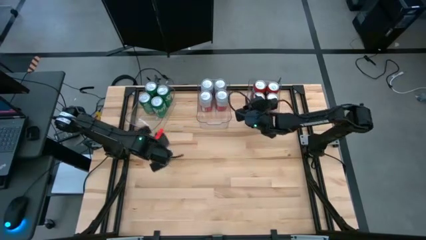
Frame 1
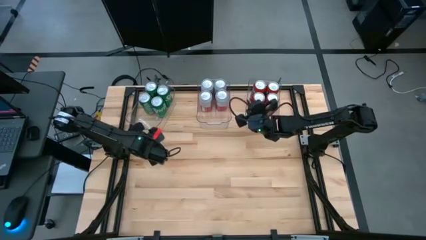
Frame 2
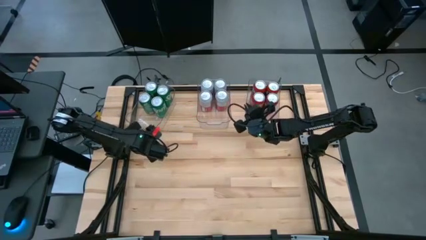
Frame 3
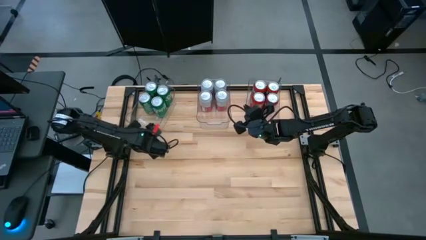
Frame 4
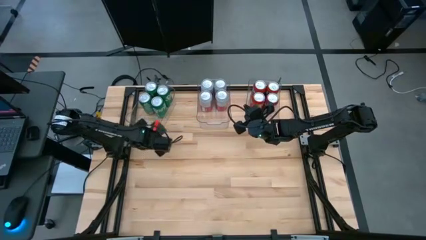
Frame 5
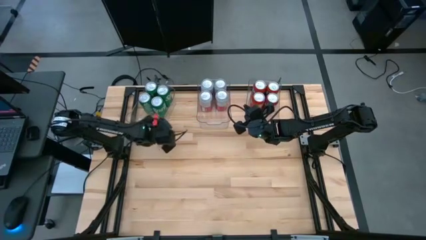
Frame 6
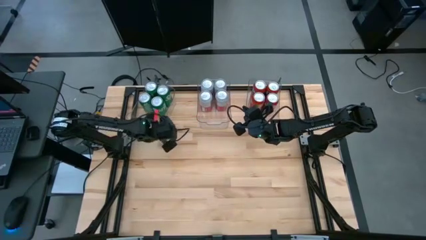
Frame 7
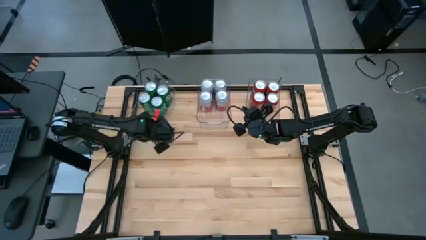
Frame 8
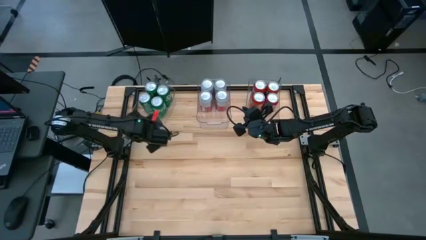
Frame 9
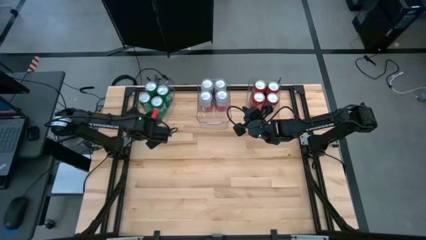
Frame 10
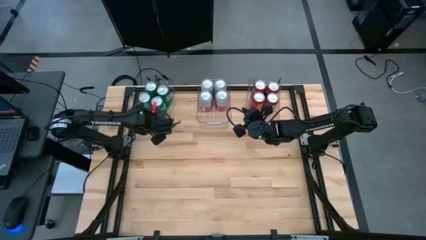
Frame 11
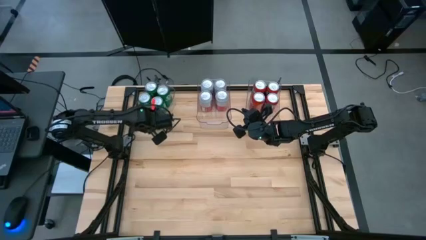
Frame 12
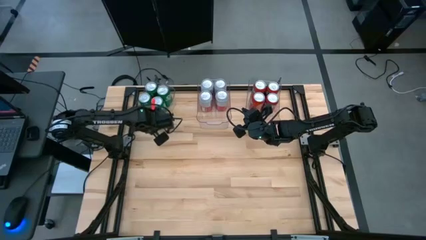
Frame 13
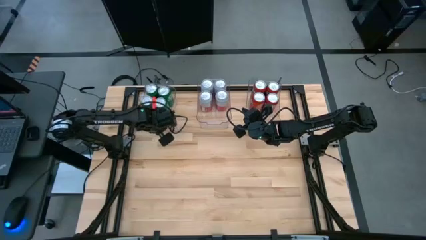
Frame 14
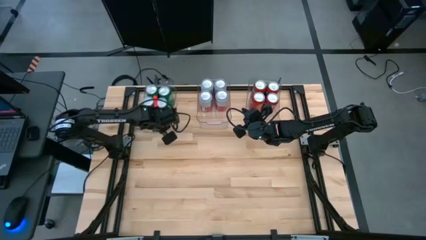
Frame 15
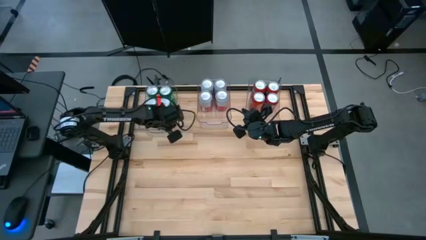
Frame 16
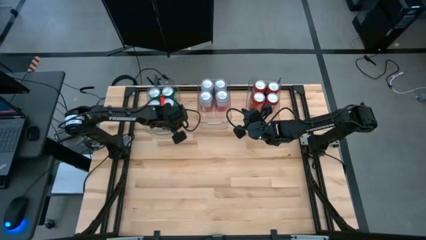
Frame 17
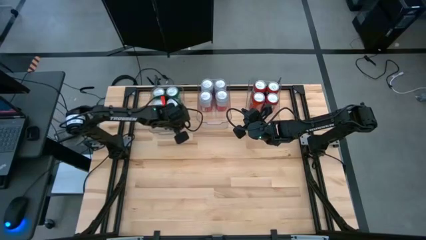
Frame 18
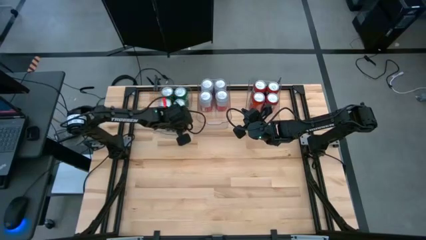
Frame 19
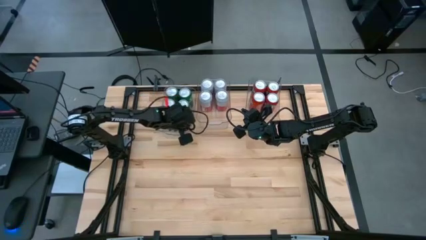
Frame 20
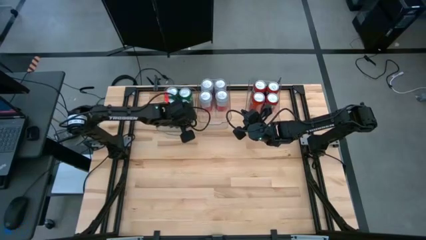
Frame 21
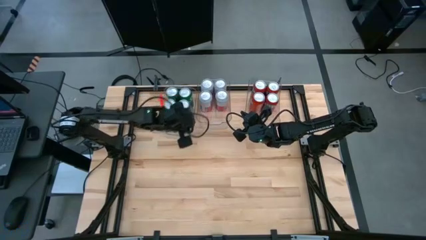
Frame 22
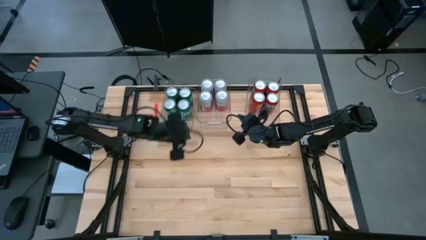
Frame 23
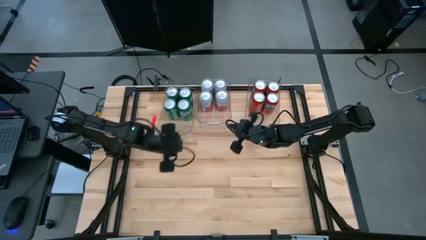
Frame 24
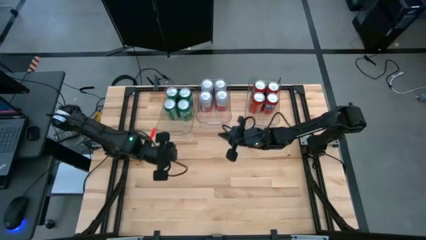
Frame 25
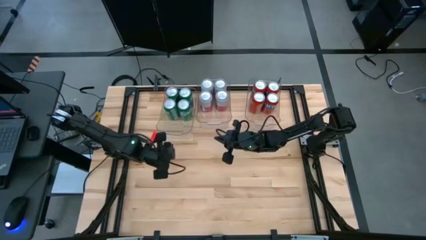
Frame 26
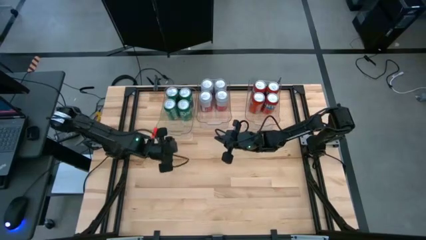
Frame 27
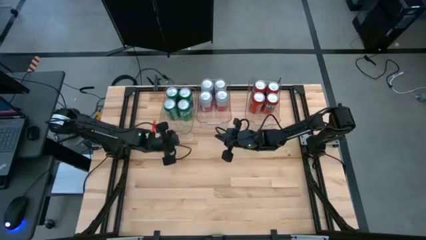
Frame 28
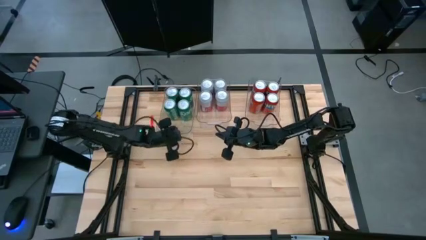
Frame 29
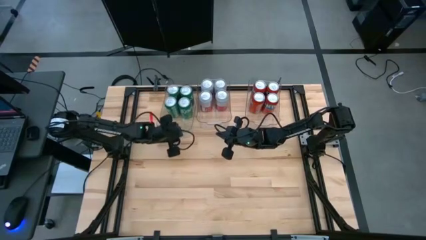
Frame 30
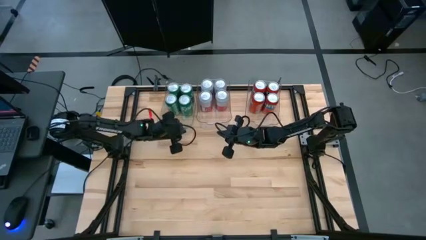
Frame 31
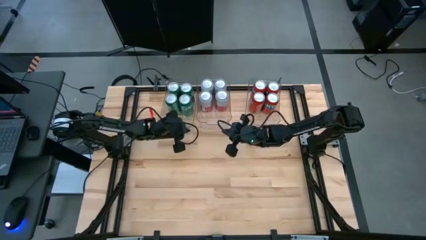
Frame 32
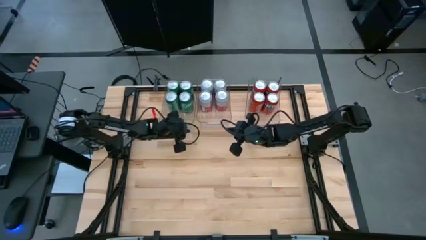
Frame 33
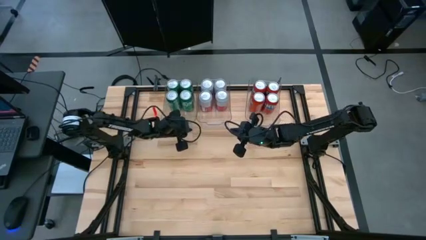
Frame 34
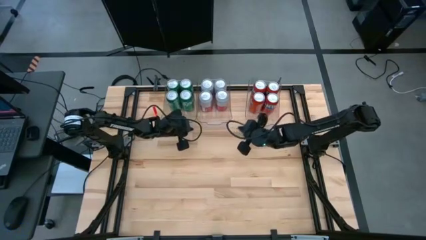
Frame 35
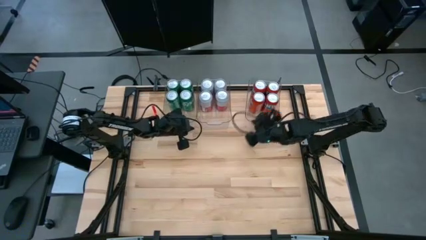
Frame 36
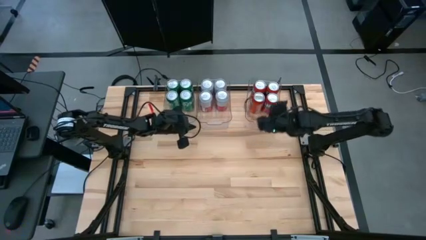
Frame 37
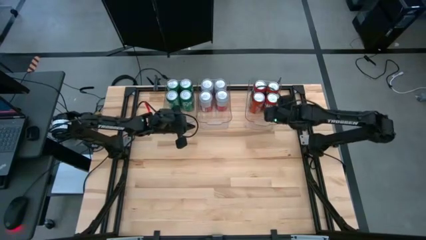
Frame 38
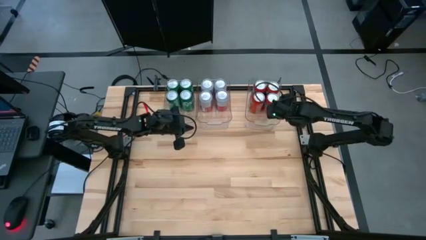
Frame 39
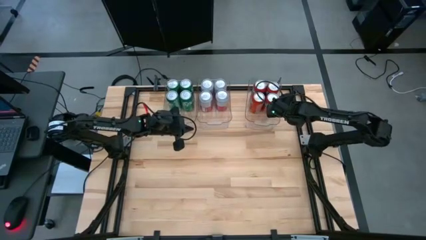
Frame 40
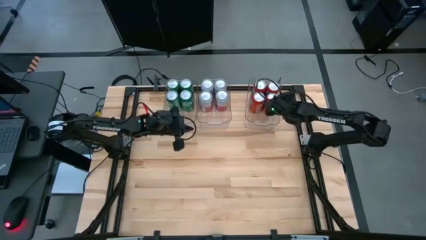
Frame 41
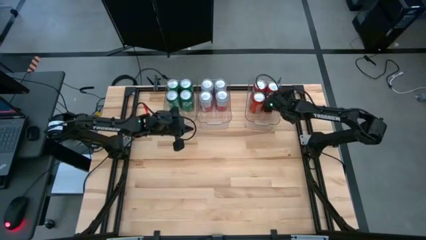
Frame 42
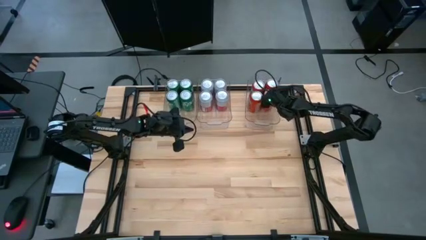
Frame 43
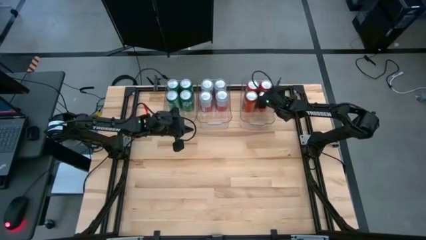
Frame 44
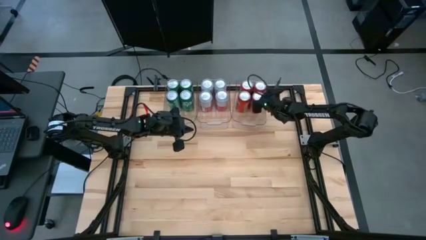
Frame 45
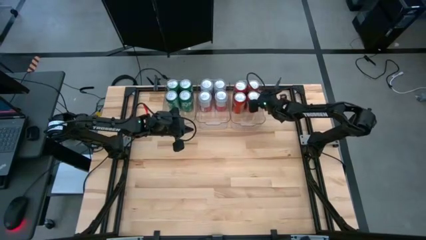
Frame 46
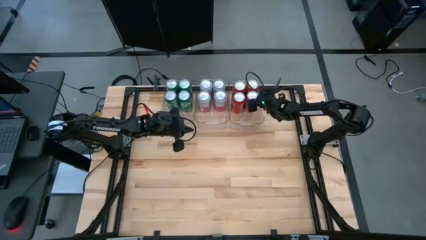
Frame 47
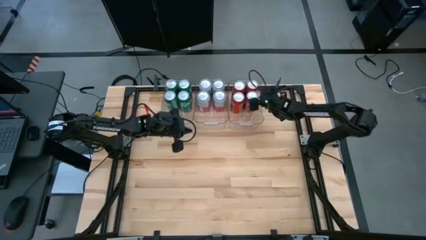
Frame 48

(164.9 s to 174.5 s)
Task: Sort soda cans
Adjust the transparent bins

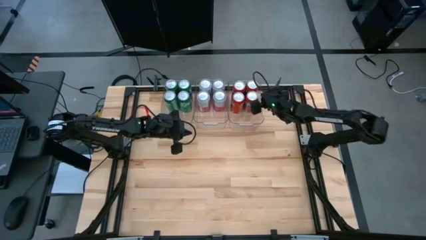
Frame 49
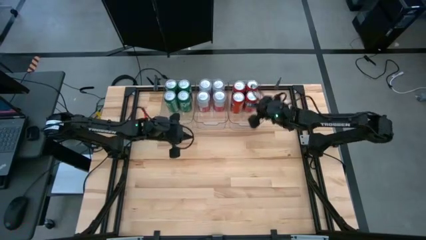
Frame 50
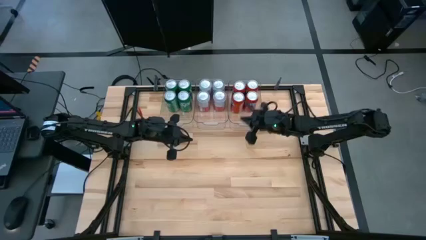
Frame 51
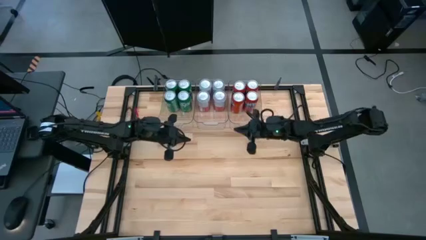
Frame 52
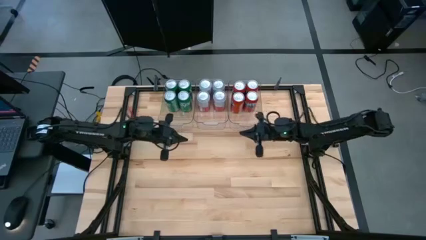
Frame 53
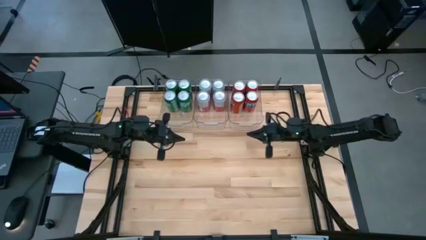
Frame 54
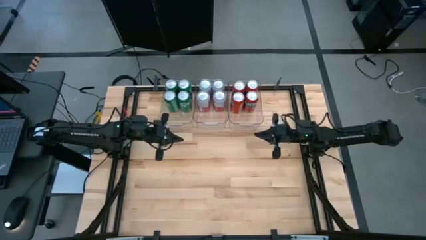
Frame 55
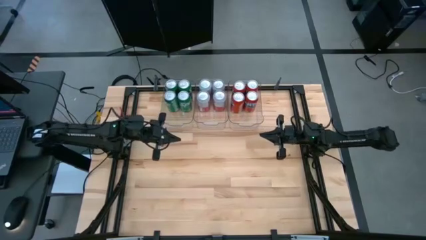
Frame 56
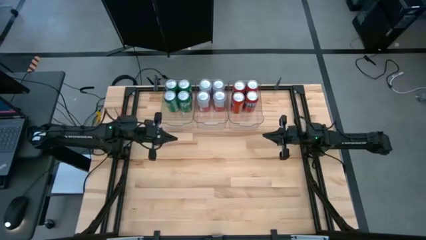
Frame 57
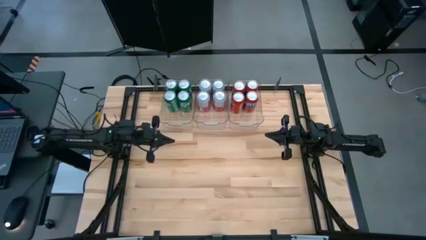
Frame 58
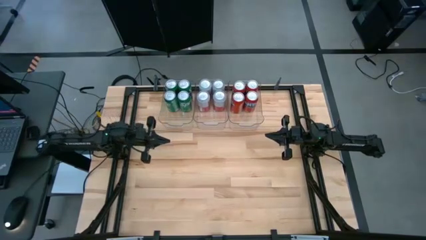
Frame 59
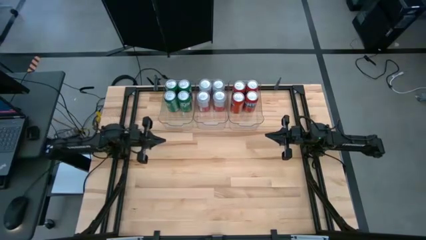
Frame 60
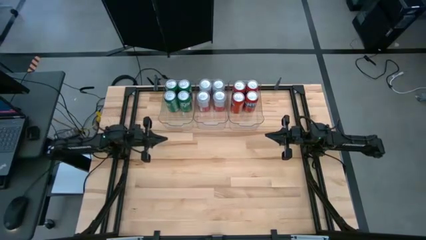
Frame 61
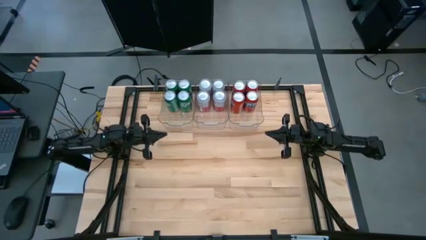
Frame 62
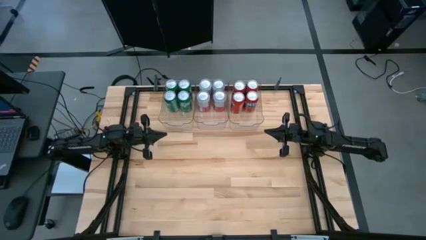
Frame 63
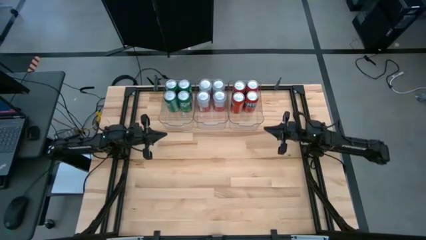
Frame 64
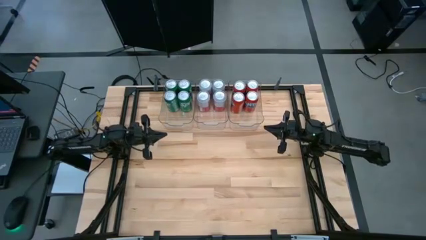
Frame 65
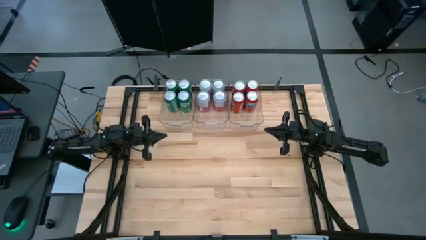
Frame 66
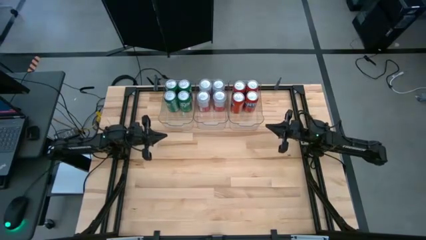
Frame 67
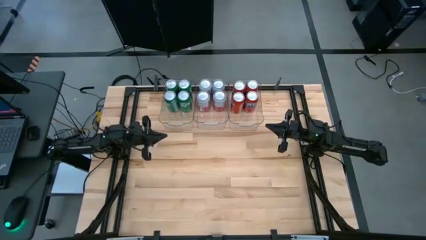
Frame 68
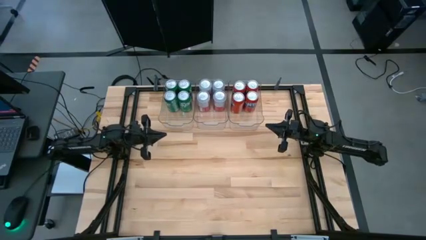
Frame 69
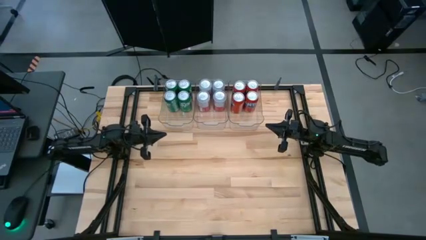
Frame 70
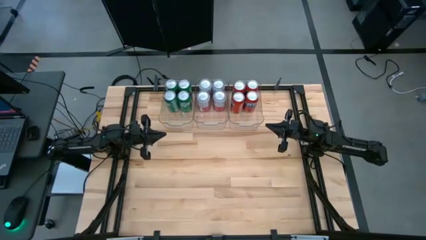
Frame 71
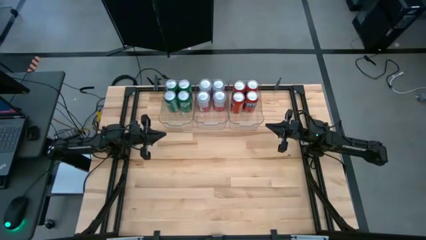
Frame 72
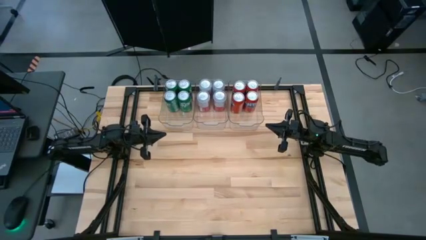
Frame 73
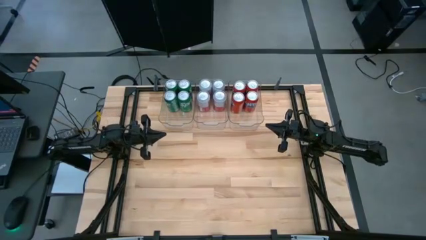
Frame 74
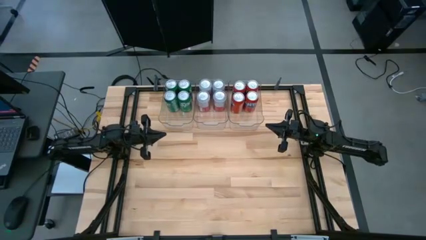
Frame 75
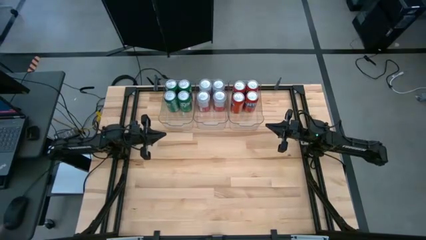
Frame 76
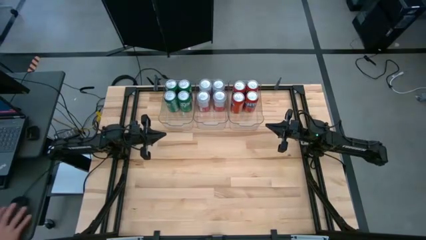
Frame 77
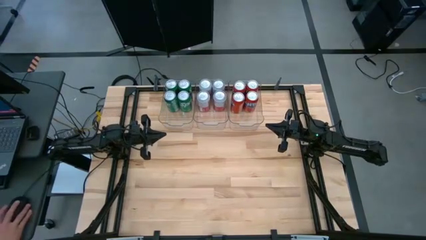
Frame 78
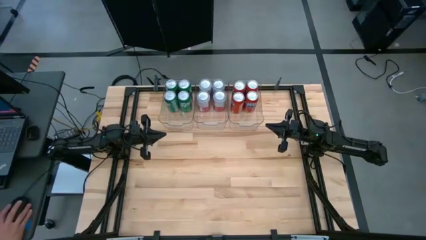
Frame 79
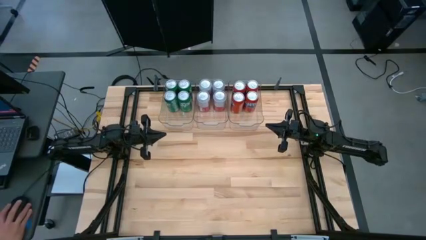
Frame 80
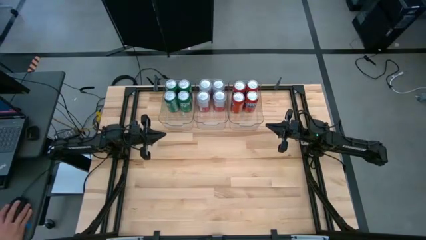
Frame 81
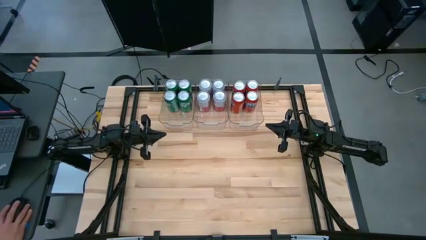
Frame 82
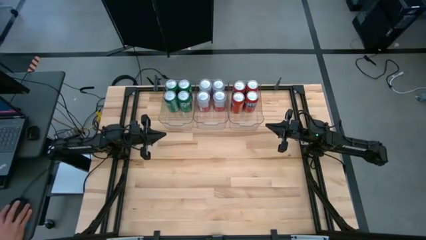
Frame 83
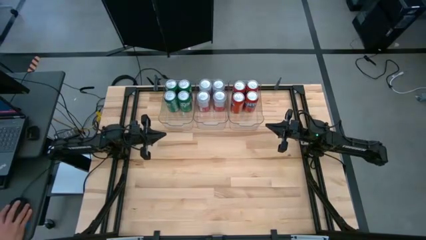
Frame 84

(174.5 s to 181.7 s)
Return to Home Position
